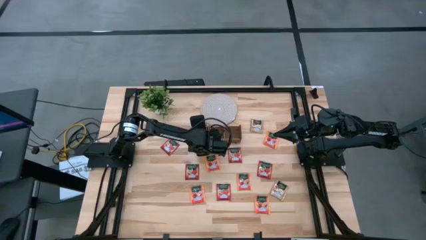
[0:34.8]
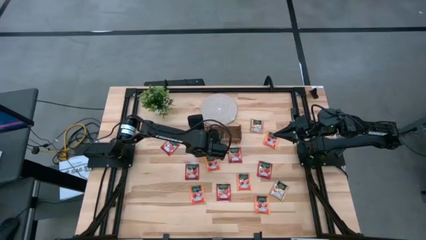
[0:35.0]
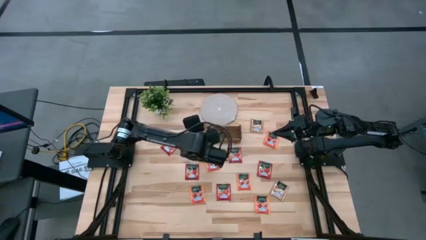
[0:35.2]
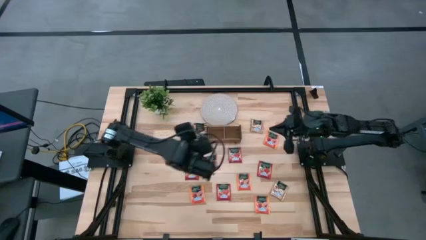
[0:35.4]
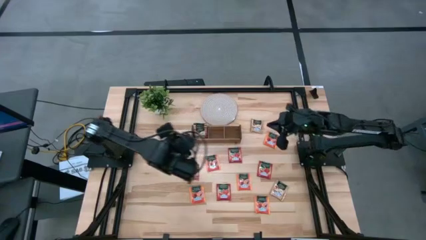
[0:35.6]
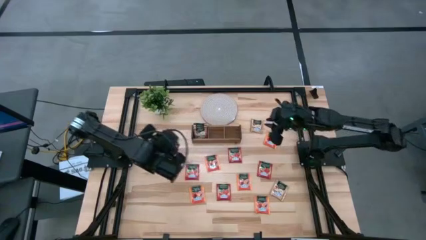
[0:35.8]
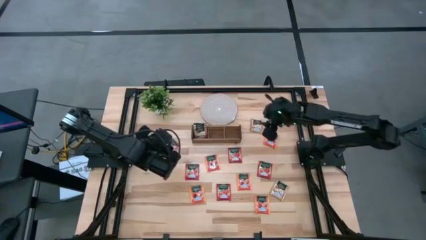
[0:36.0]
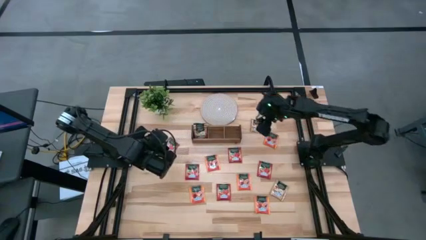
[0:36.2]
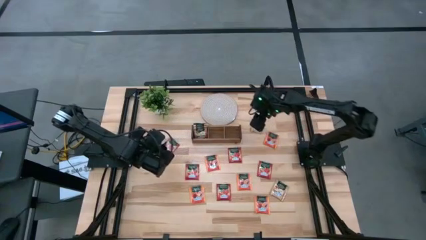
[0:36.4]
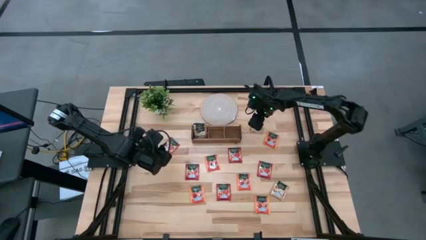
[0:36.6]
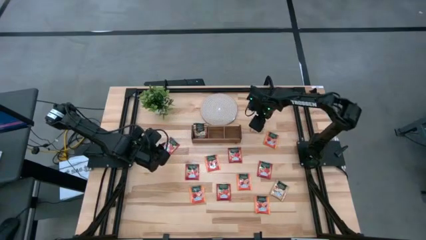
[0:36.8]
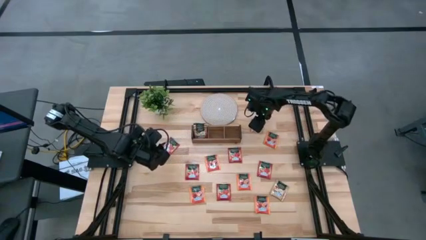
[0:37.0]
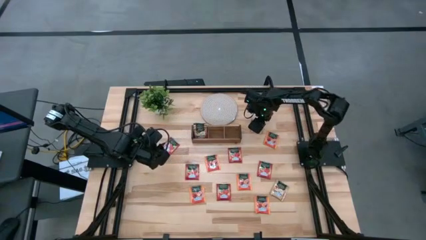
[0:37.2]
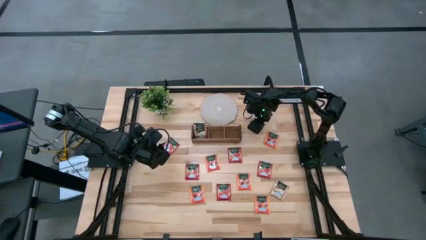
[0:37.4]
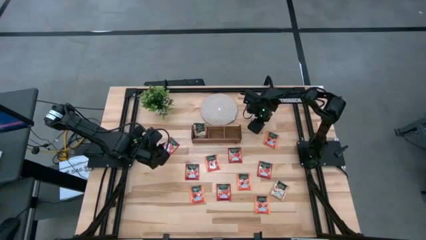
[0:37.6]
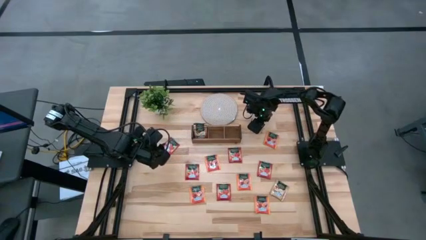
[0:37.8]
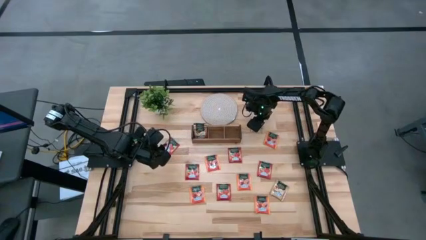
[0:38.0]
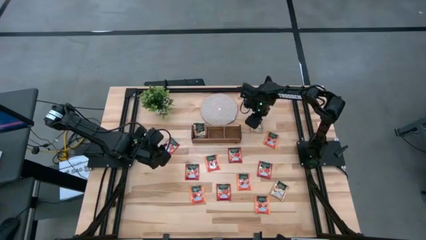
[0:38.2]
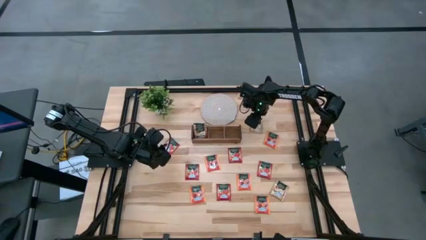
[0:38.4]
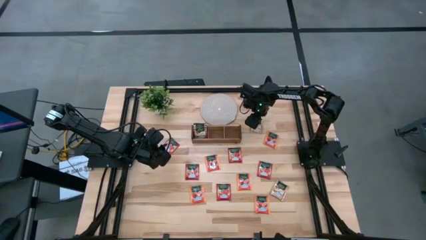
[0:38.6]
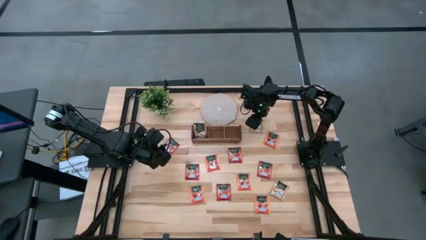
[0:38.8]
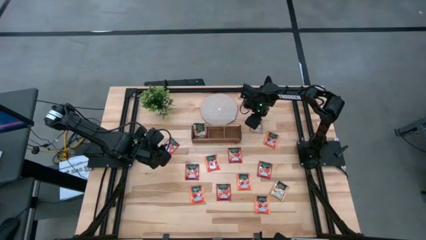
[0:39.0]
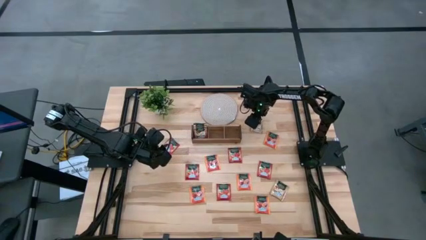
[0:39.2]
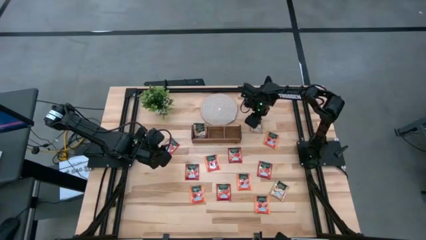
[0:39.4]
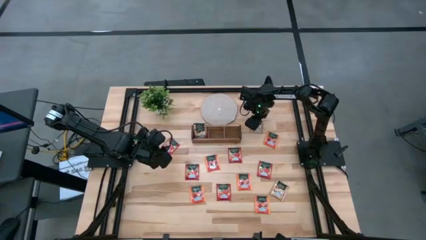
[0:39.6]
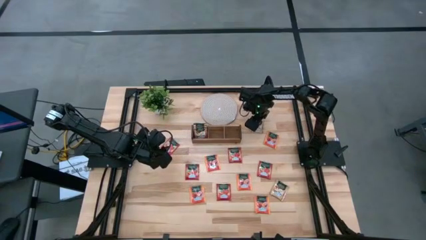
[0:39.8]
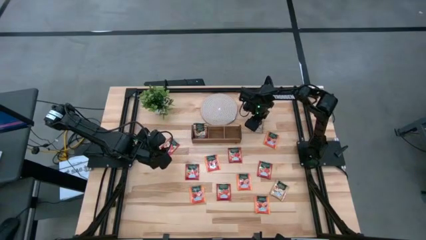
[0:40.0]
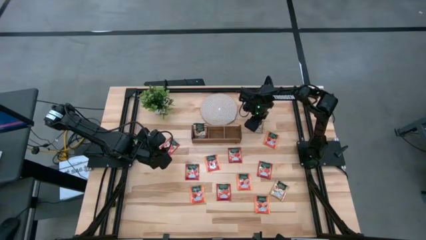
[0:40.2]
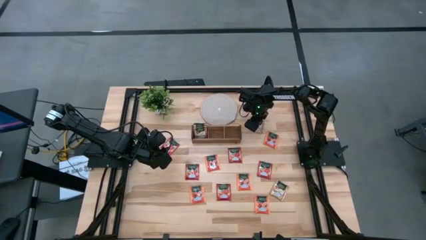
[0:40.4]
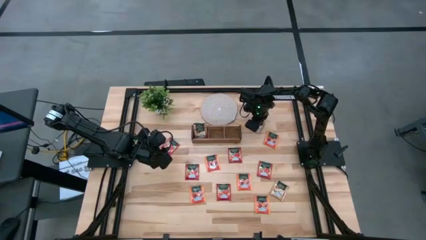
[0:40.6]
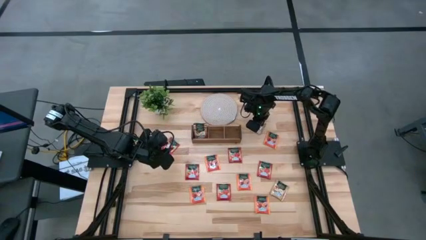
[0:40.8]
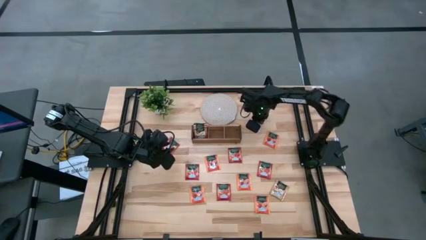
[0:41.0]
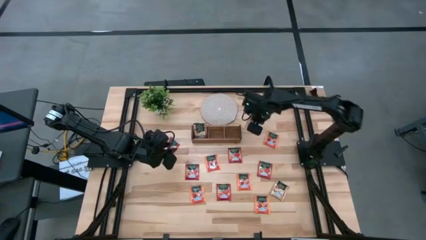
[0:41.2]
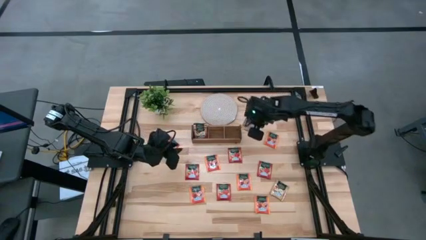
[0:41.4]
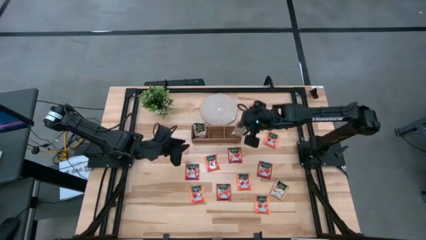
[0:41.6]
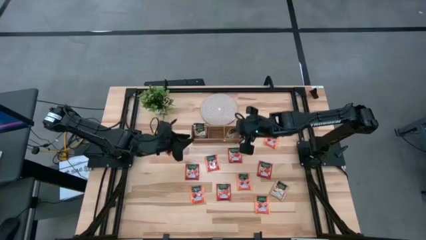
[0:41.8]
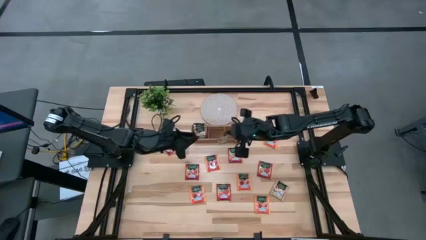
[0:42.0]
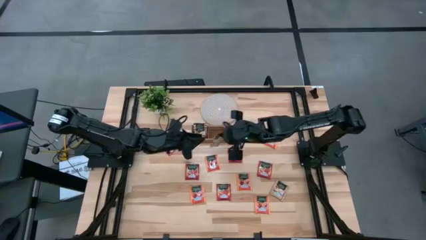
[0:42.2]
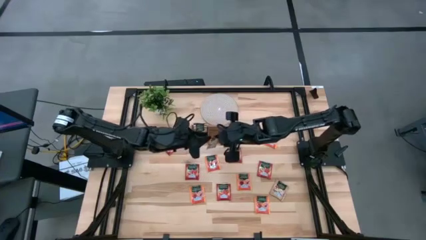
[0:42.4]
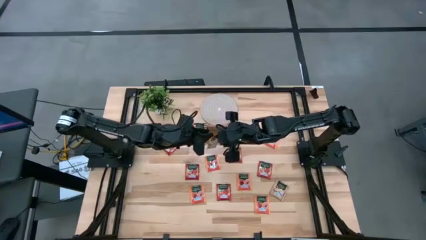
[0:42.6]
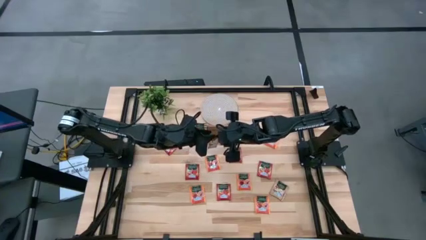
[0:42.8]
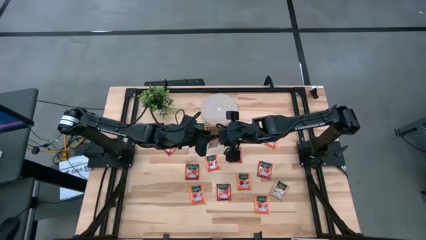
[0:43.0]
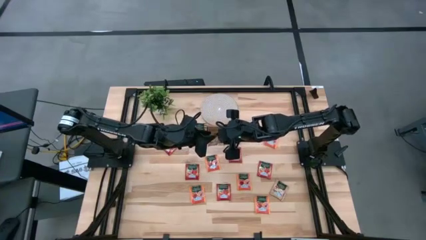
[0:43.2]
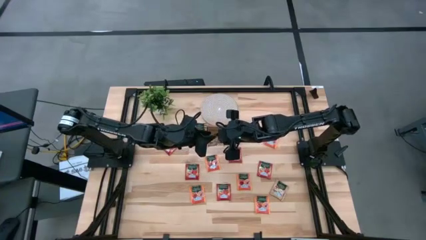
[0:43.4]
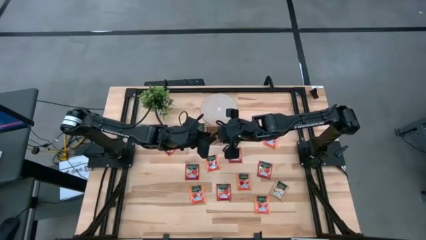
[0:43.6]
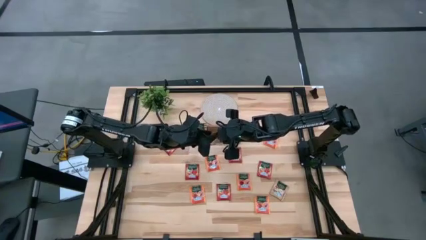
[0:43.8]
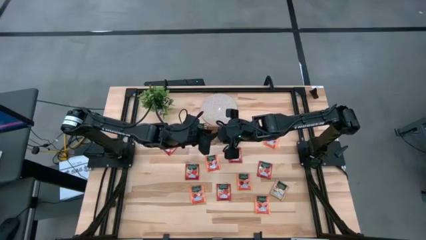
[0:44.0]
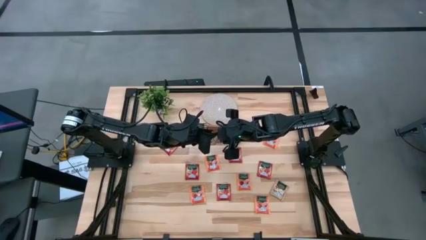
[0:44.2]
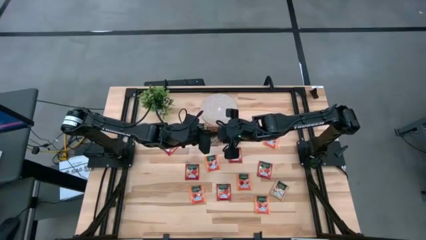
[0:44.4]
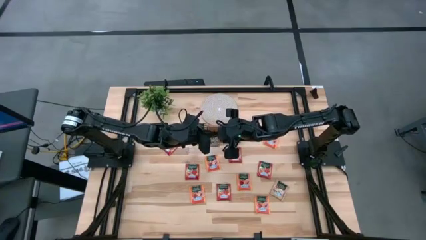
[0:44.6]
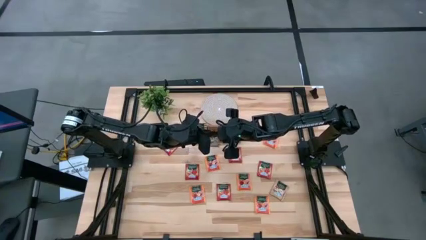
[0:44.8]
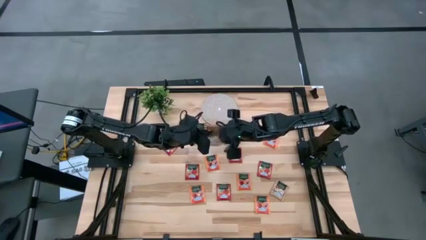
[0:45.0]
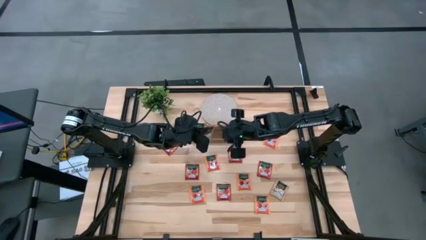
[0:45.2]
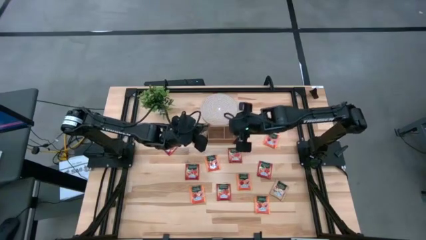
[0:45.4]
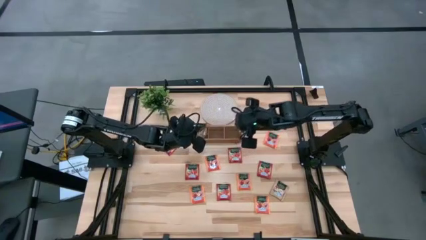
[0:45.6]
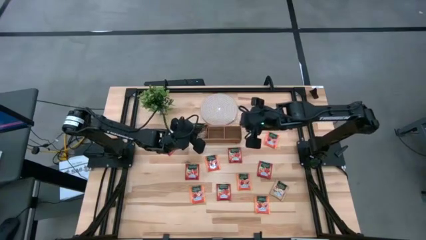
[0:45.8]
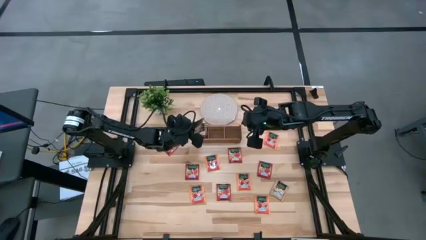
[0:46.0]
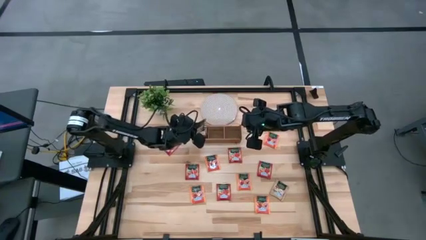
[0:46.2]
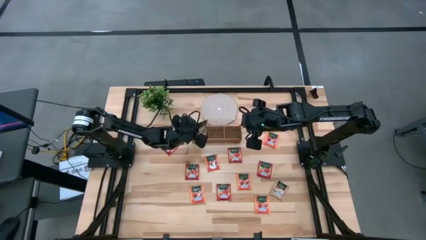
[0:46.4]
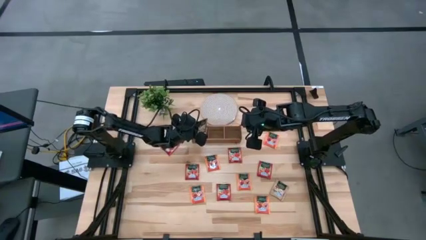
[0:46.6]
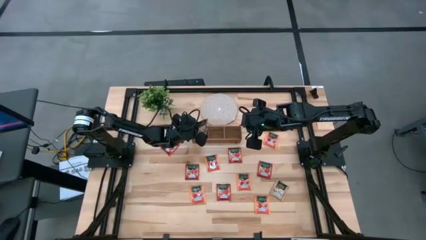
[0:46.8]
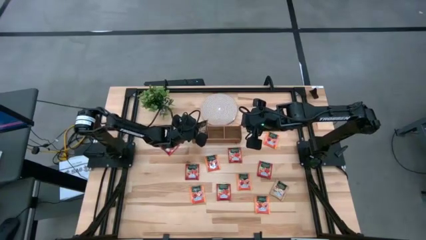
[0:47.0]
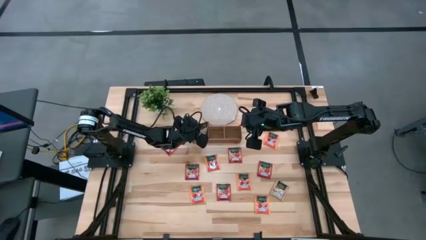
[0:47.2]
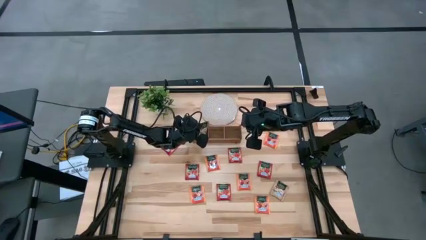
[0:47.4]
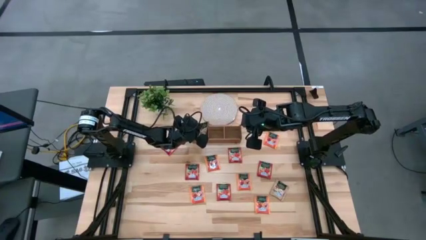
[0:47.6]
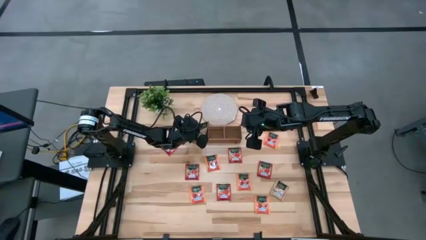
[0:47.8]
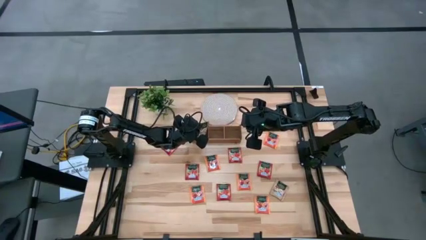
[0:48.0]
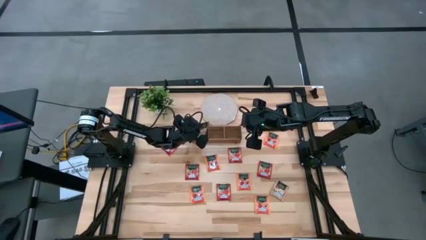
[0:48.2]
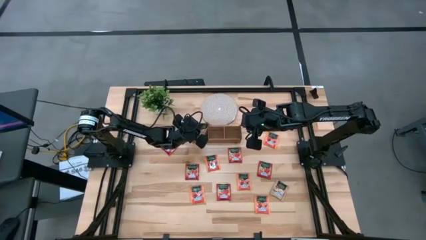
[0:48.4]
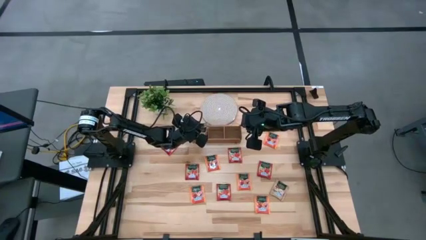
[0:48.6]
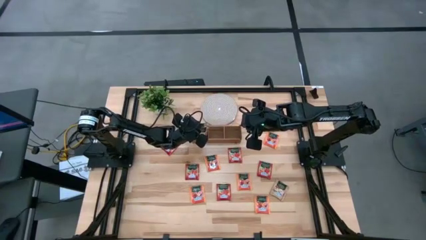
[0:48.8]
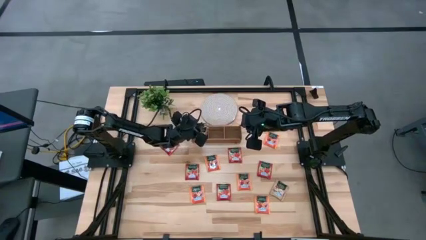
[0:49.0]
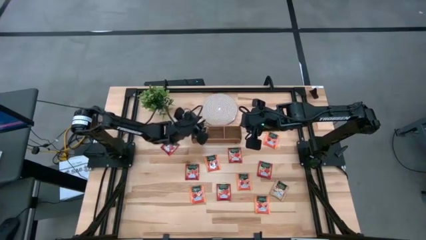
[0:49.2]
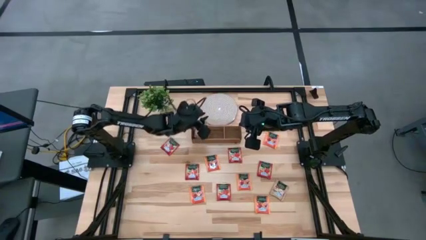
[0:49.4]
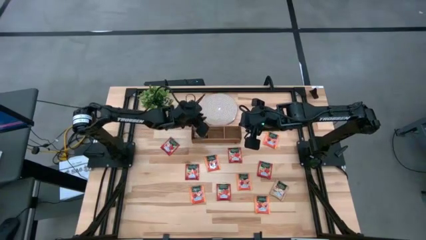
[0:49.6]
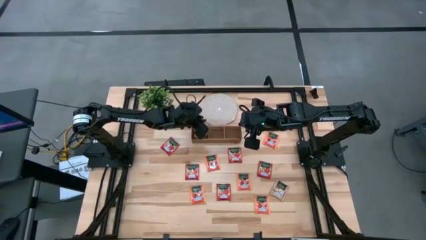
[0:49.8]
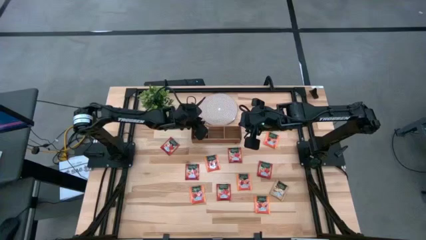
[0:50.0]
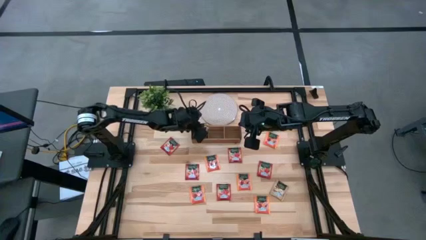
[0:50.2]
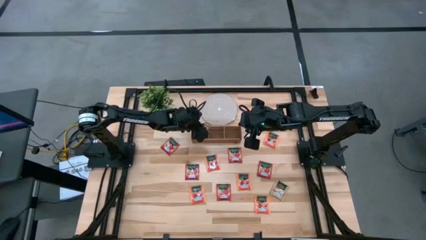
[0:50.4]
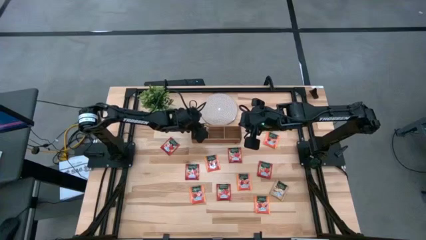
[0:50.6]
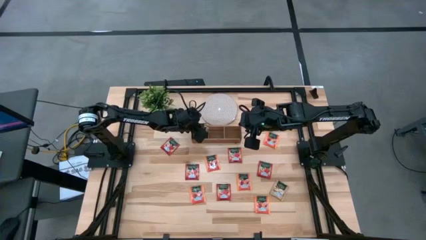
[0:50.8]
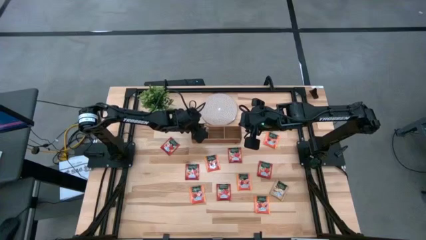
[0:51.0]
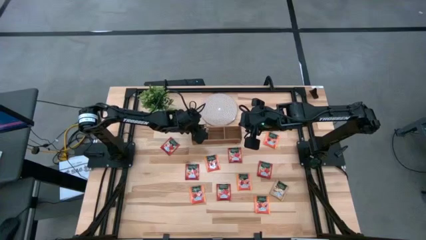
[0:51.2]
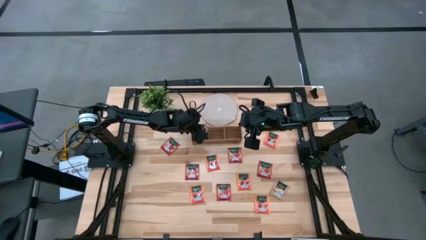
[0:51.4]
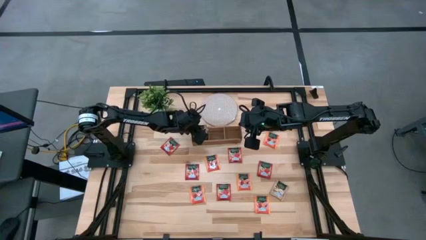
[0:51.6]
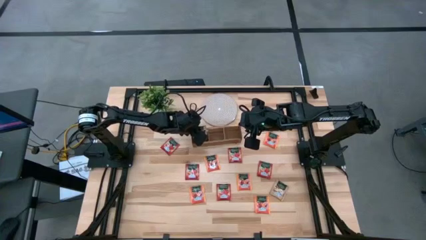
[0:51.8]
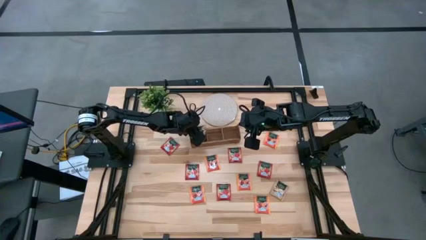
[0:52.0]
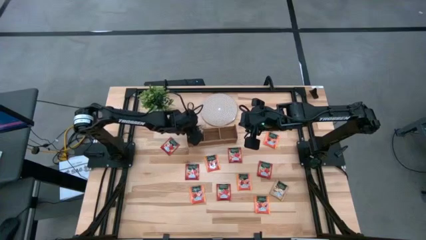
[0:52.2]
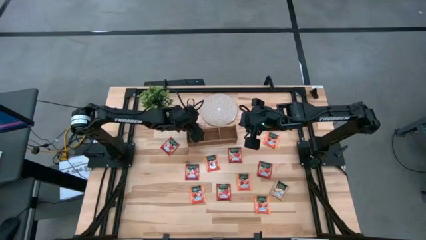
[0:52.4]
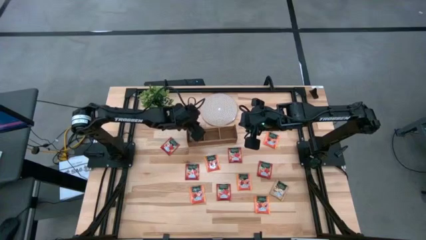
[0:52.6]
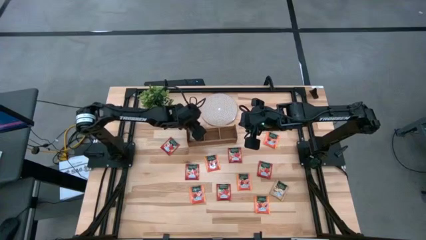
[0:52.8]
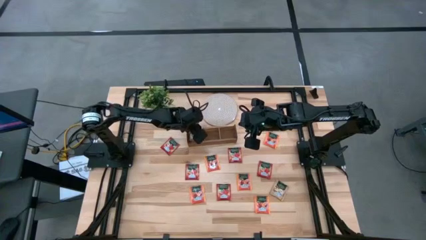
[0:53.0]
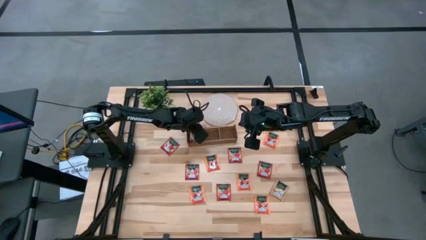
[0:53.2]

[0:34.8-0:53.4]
Task: Pick & Place Tea
Put the brown tea bag into the left of the wooden organizer
